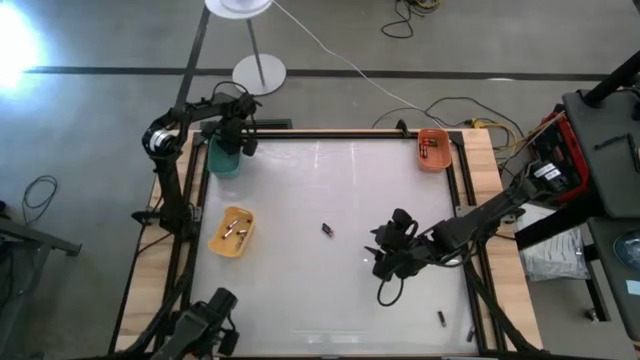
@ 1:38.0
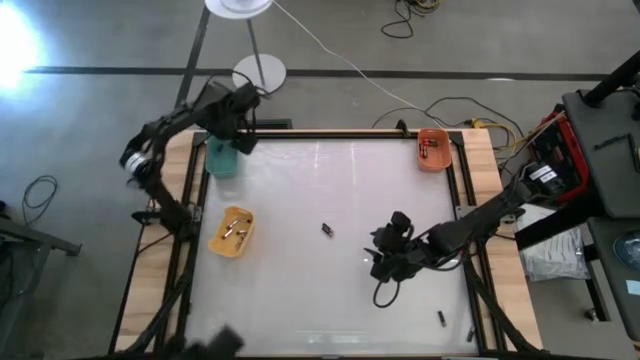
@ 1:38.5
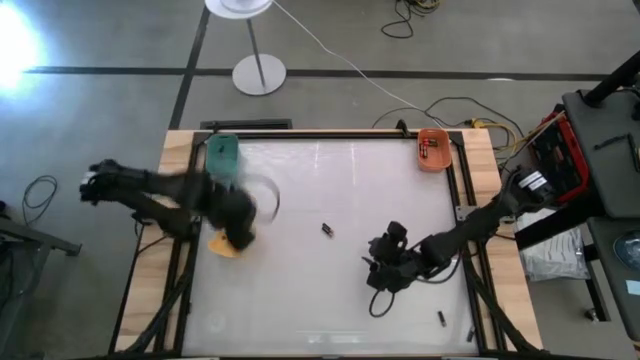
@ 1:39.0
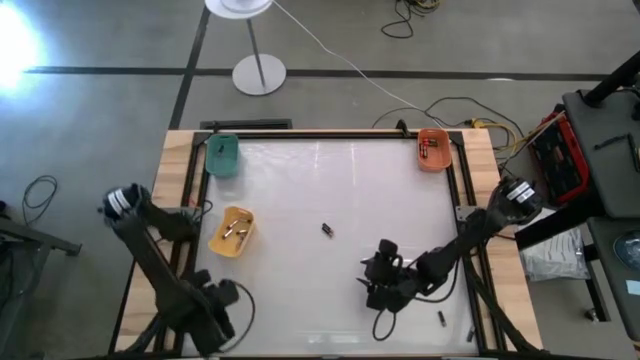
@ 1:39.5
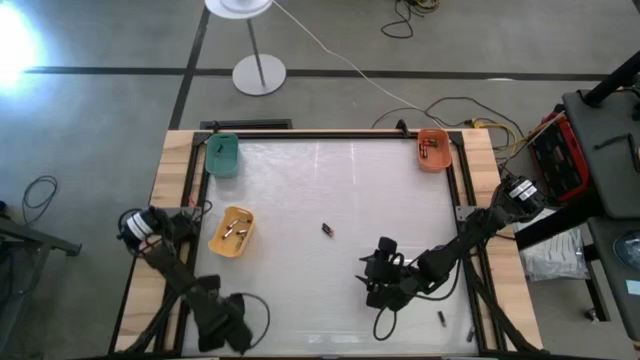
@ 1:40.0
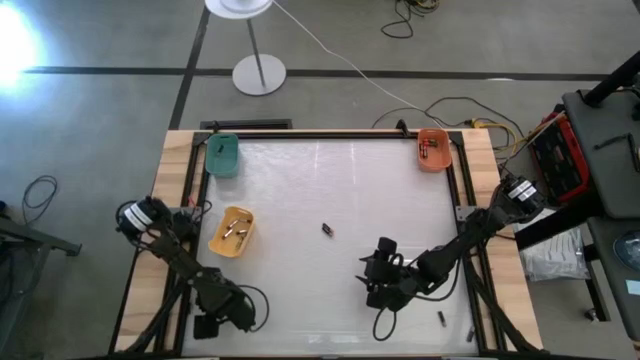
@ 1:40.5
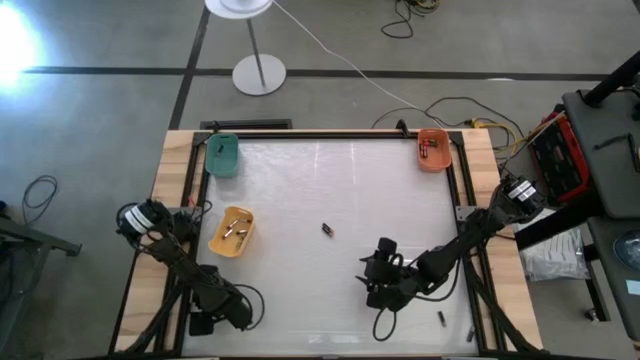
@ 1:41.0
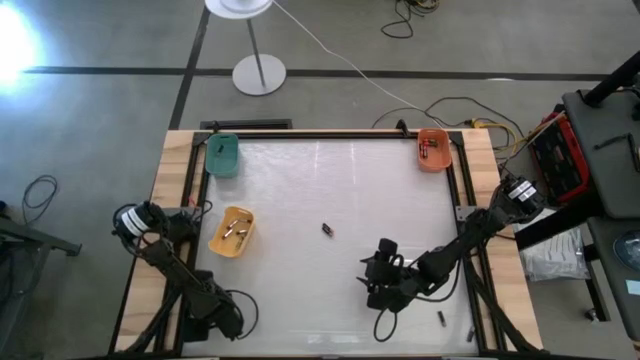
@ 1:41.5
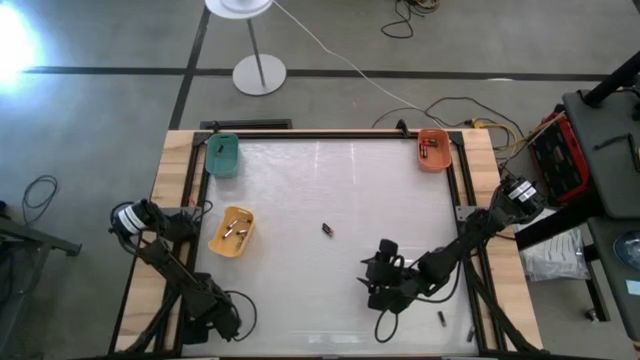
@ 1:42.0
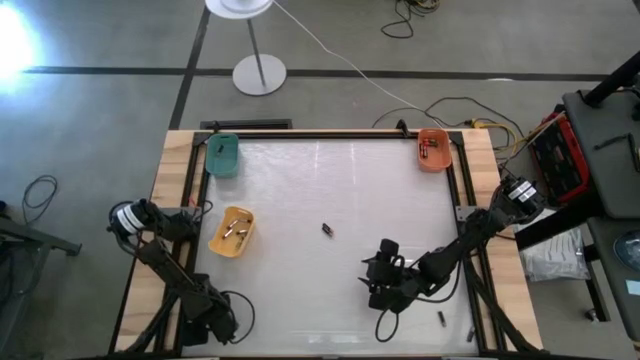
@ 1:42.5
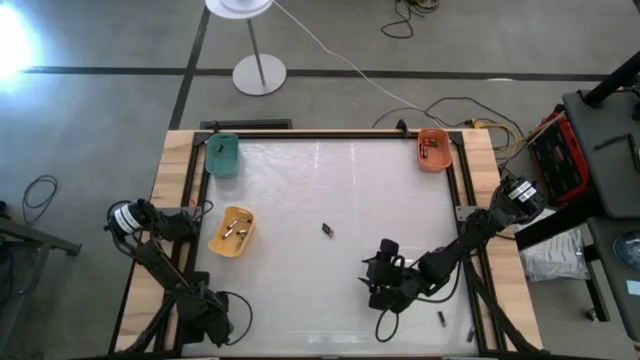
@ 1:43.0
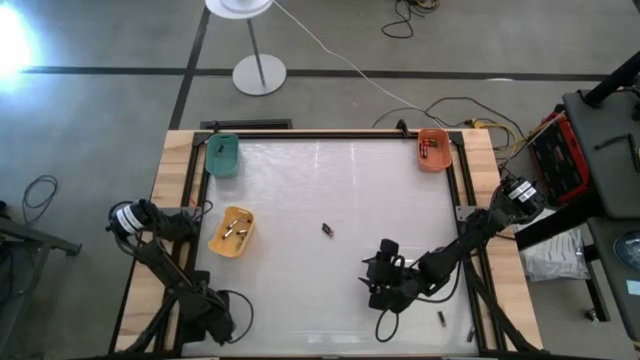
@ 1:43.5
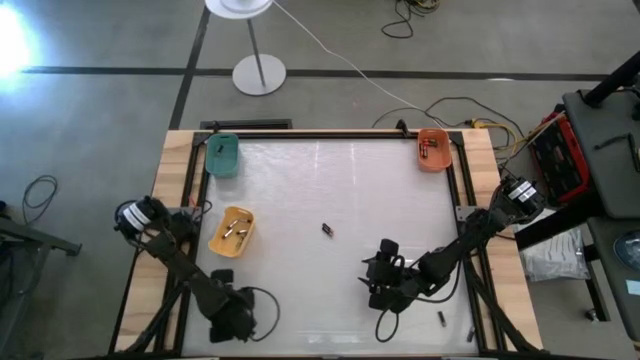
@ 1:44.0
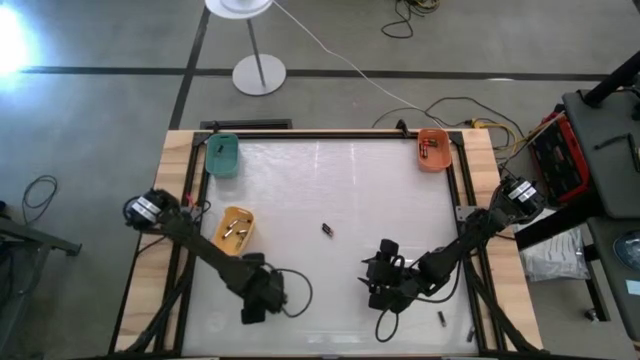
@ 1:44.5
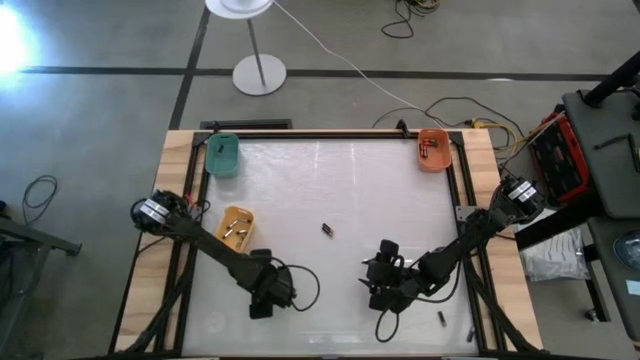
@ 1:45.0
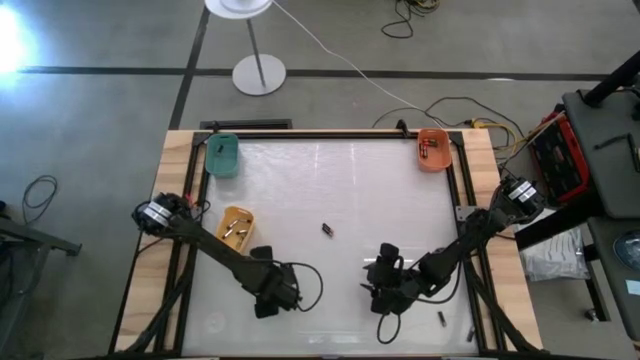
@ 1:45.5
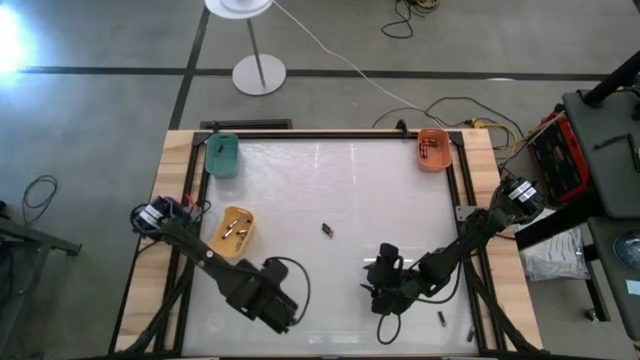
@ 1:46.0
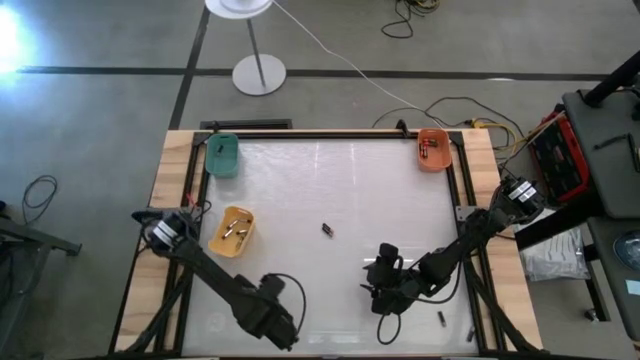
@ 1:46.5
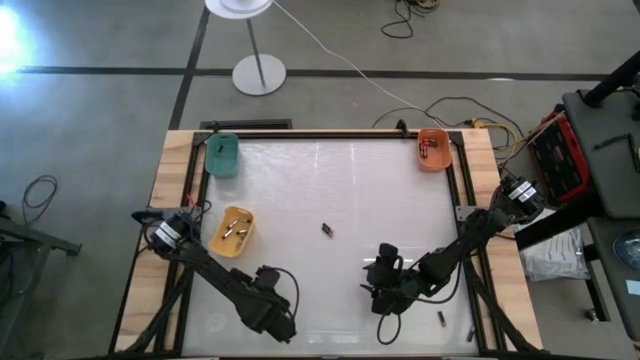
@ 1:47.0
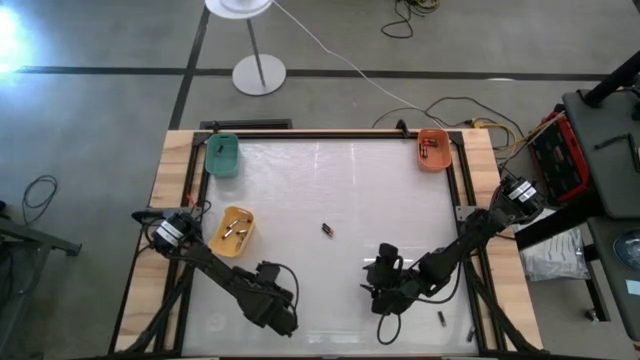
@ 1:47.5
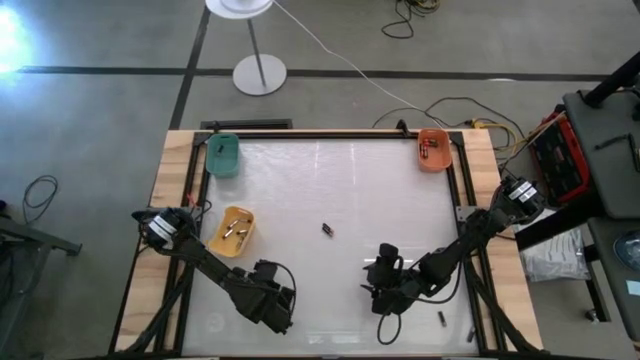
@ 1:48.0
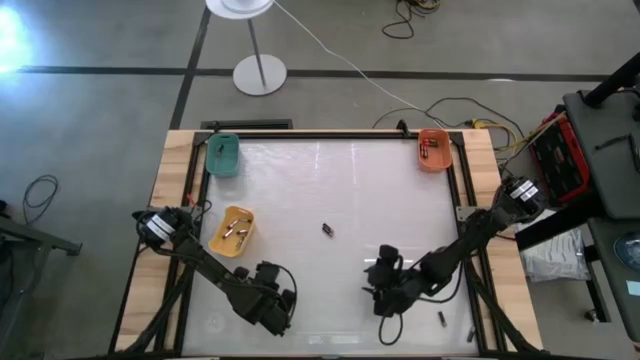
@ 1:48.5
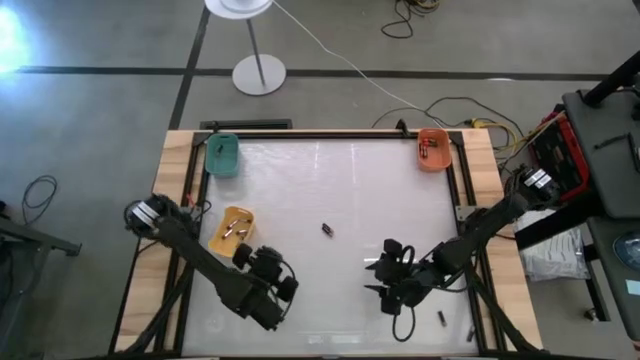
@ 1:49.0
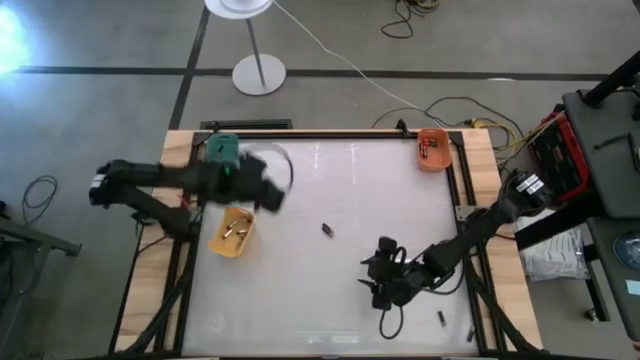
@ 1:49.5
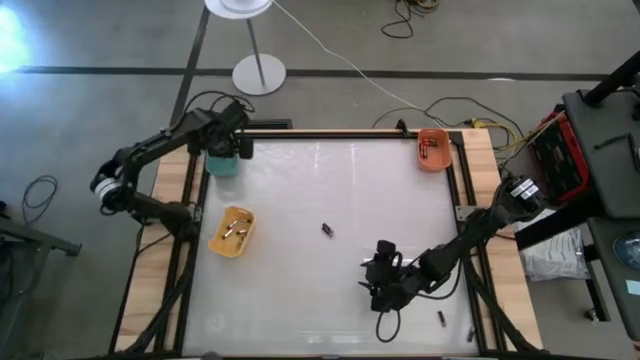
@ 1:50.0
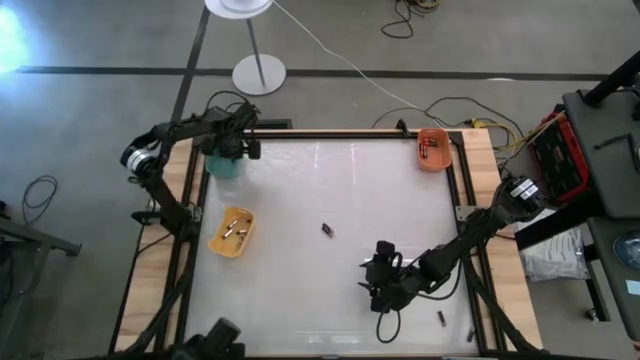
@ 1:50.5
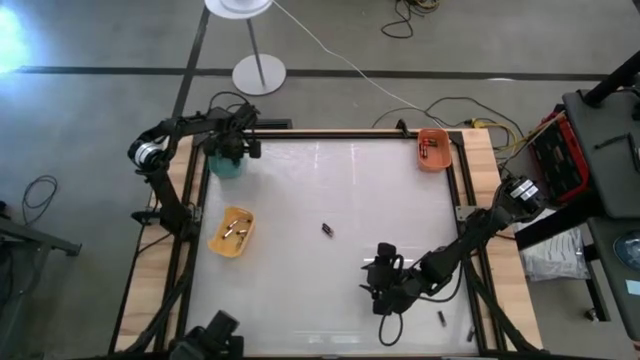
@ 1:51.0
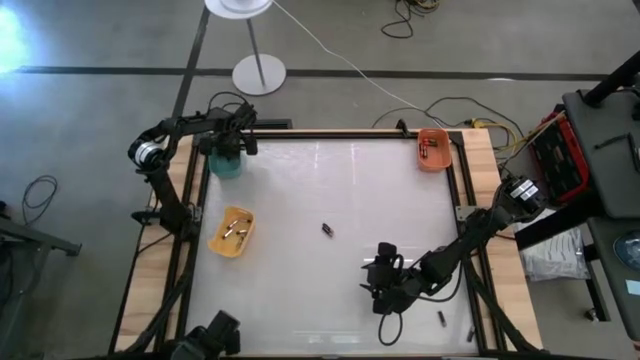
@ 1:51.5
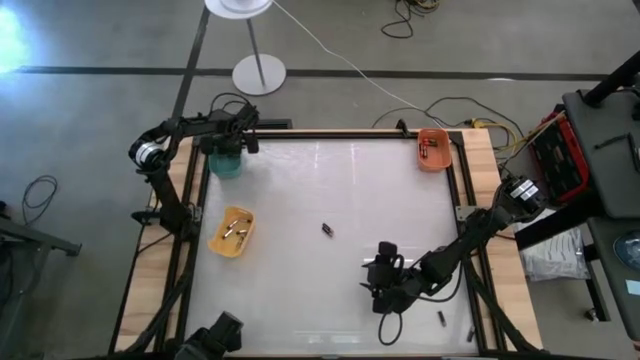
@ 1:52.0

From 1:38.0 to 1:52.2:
Task: Sort batteries
Put the black battery into the green bin

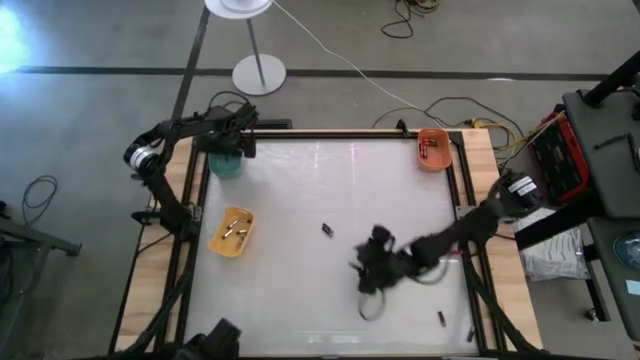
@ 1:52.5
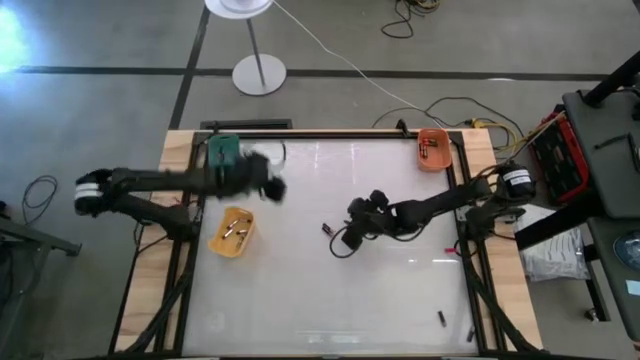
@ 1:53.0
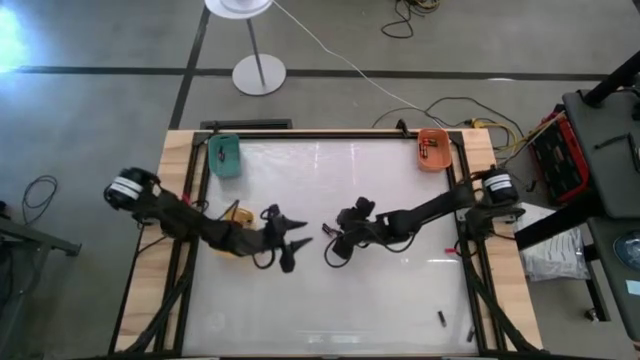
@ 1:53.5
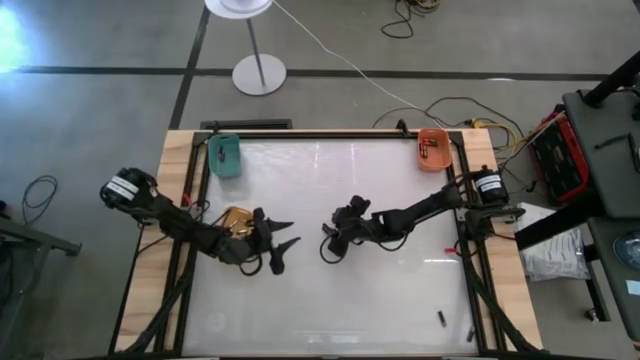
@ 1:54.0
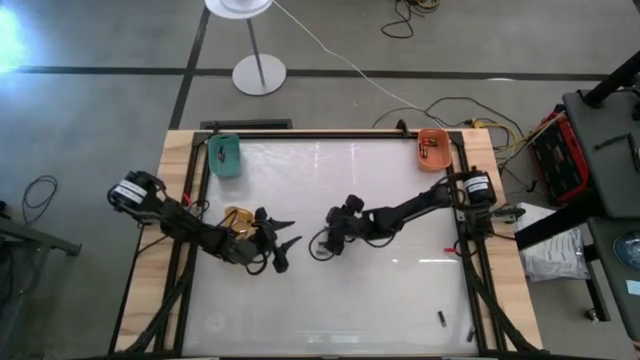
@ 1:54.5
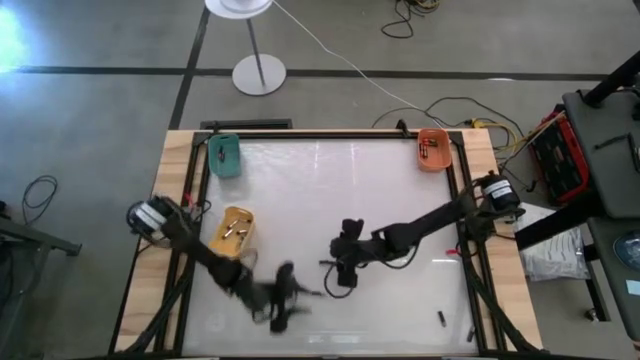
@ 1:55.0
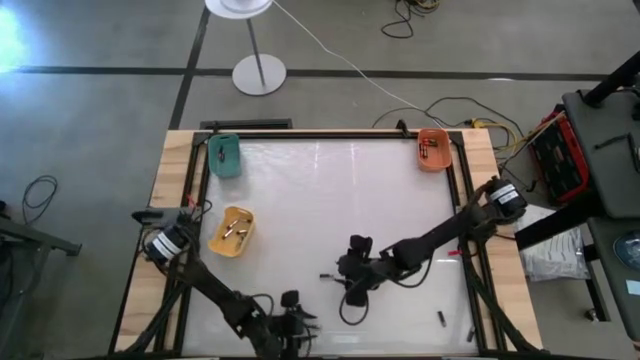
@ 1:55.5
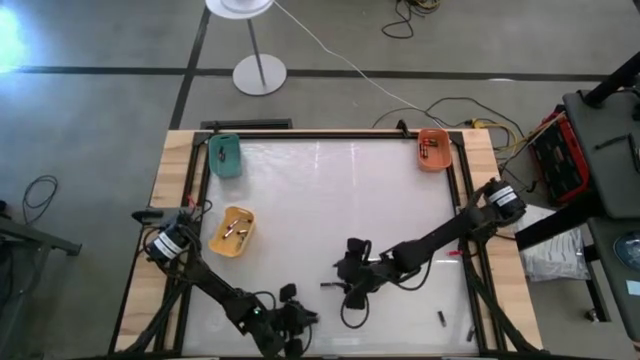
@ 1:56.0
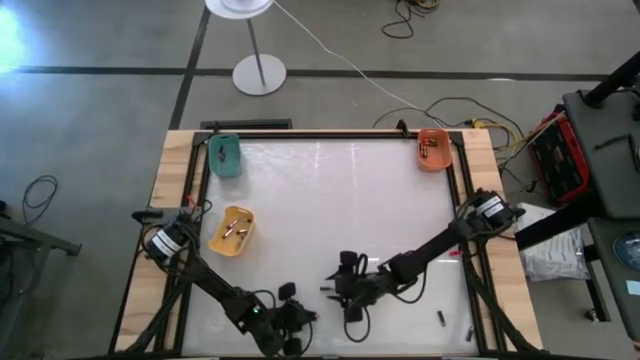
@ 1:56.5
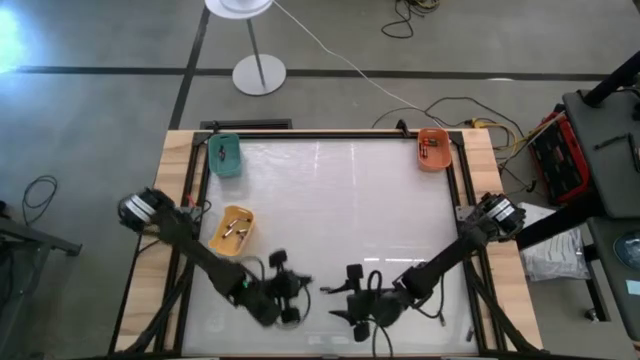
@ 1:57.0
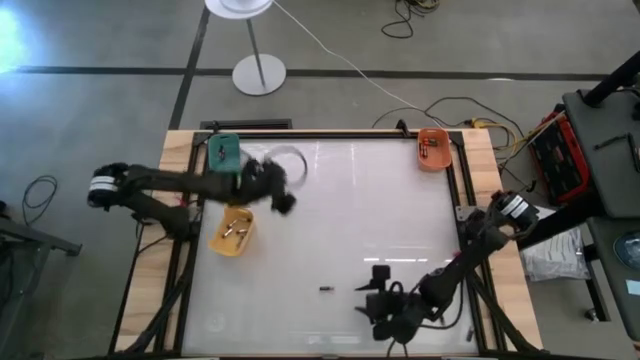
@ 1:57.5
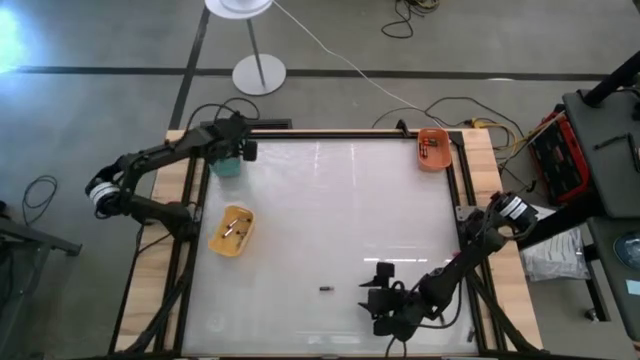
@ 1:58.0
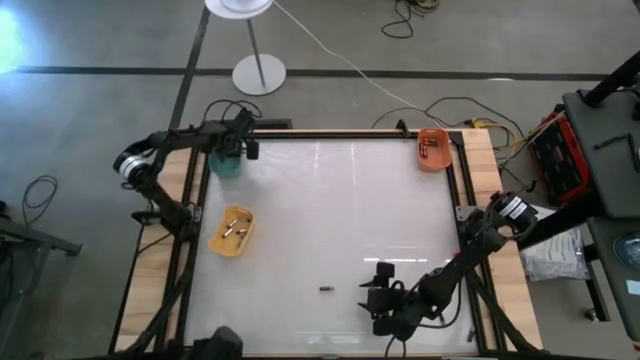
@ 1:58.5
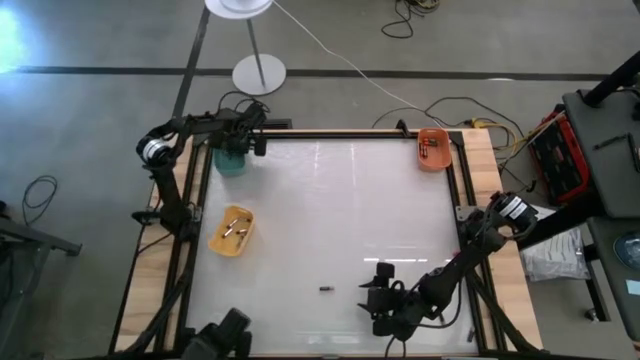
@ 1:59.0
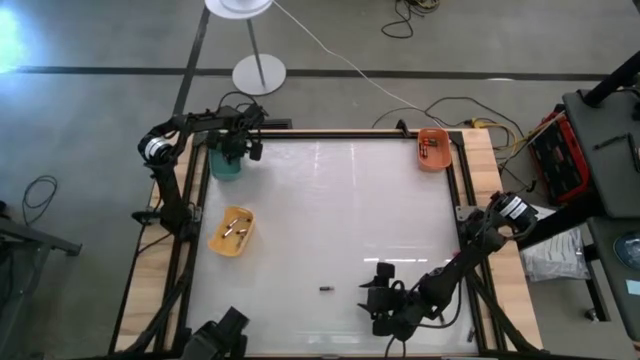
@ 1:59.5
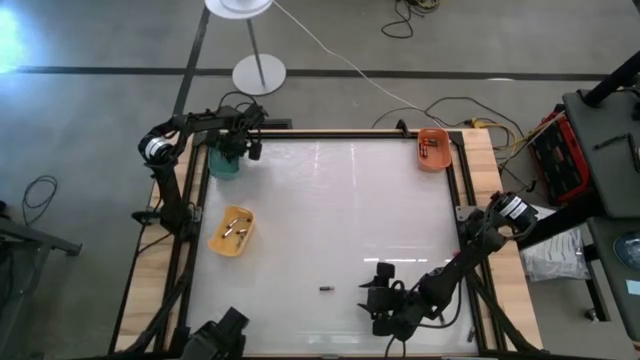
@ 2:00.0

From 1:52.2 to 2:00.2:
Put the black battery into the green bin
